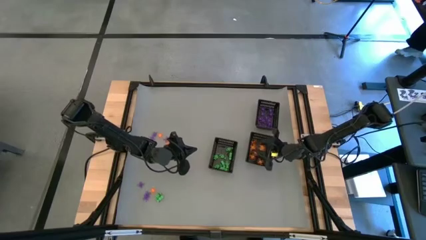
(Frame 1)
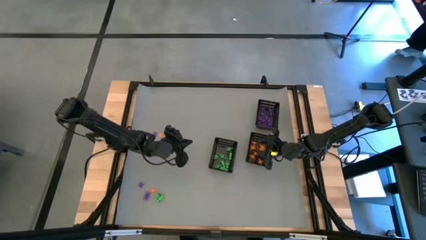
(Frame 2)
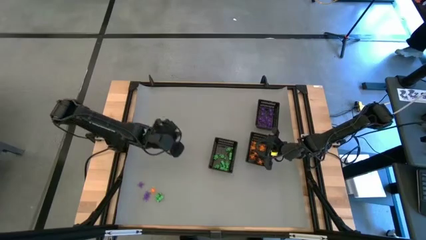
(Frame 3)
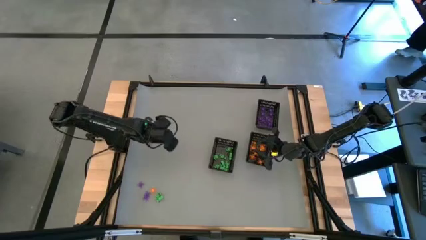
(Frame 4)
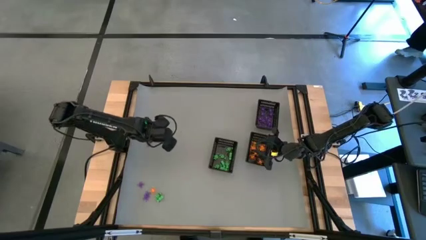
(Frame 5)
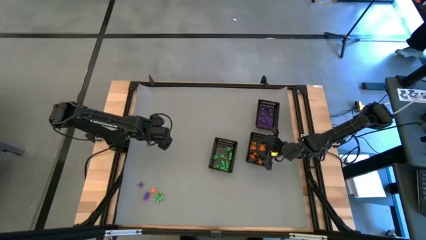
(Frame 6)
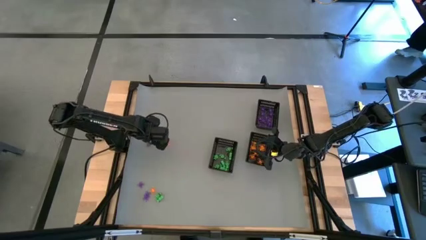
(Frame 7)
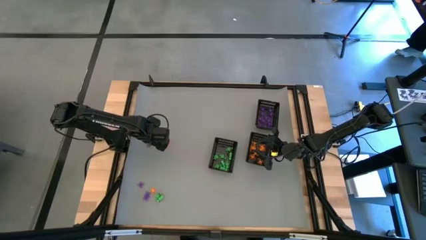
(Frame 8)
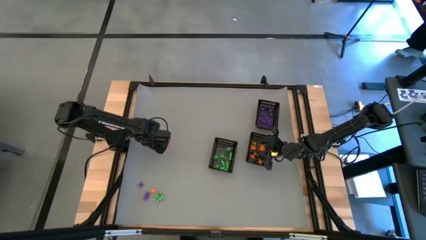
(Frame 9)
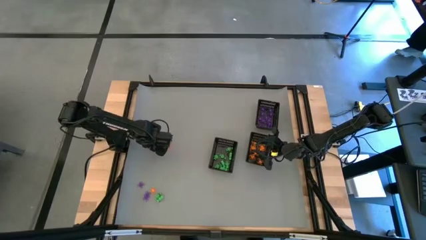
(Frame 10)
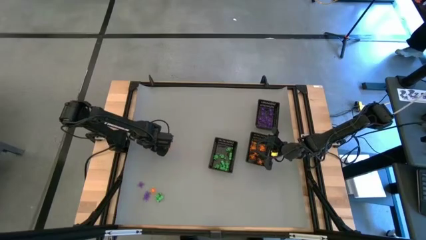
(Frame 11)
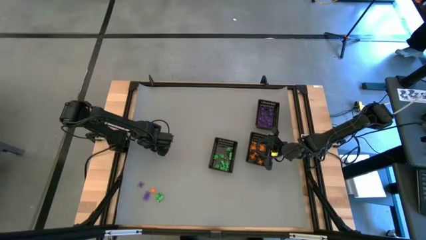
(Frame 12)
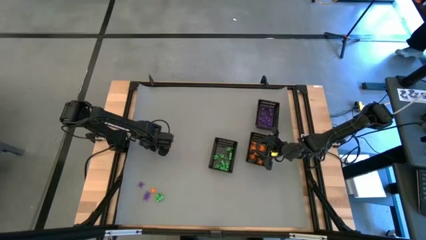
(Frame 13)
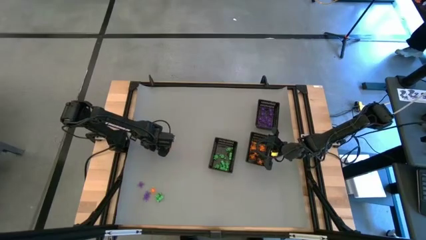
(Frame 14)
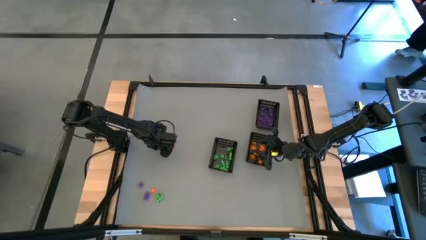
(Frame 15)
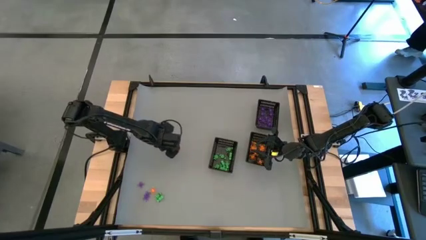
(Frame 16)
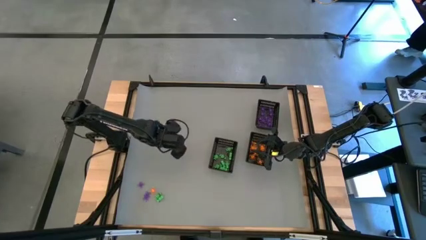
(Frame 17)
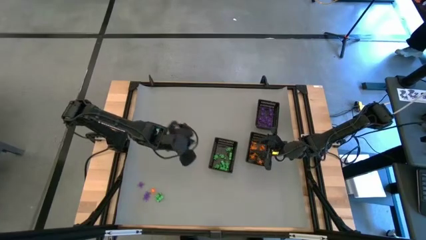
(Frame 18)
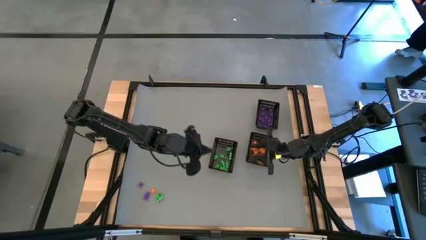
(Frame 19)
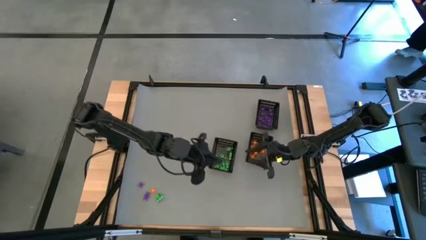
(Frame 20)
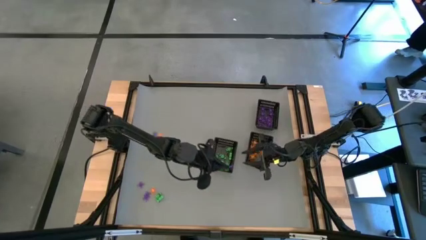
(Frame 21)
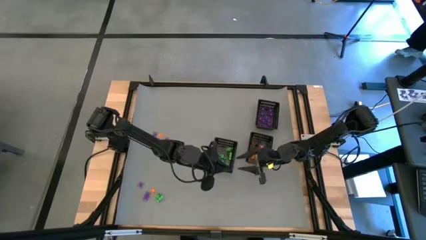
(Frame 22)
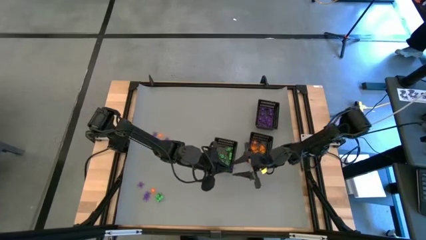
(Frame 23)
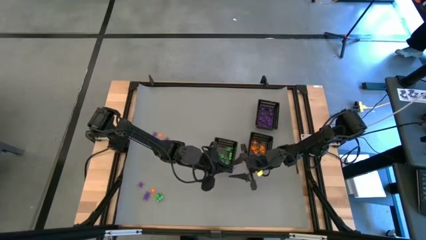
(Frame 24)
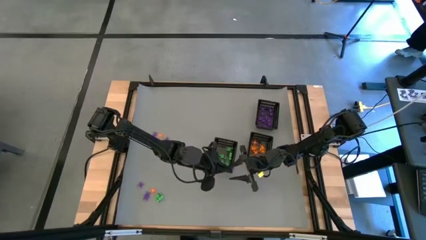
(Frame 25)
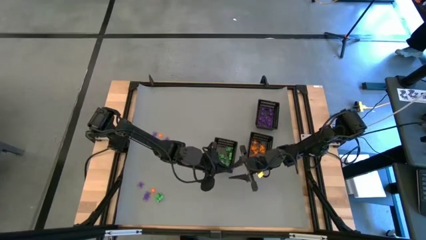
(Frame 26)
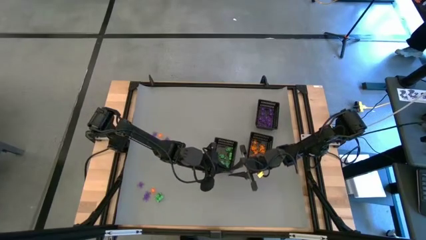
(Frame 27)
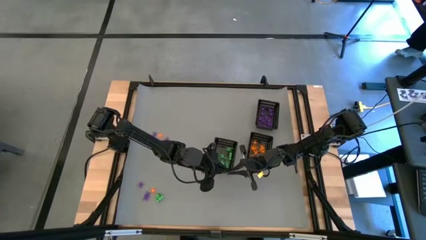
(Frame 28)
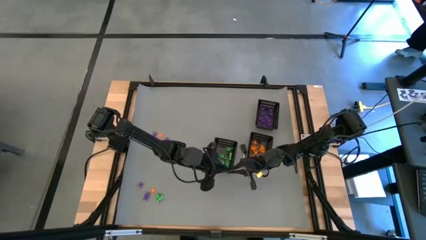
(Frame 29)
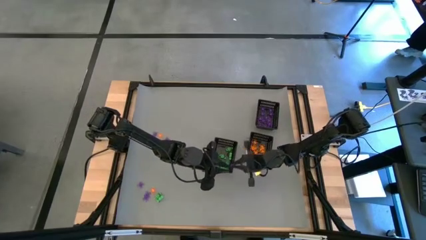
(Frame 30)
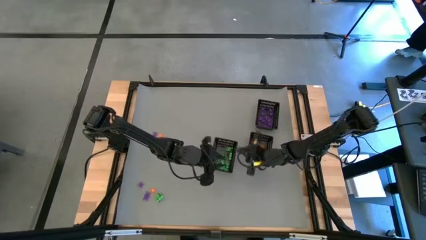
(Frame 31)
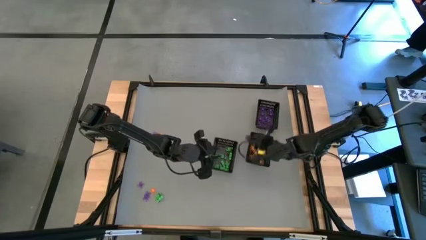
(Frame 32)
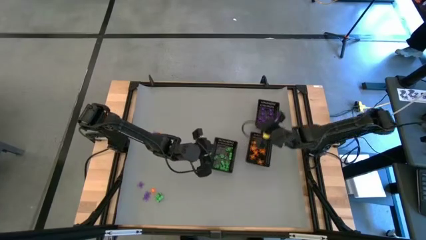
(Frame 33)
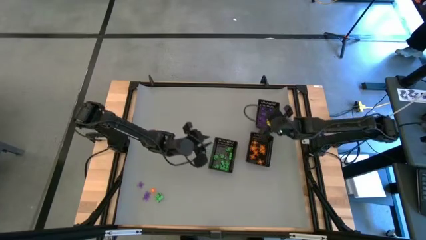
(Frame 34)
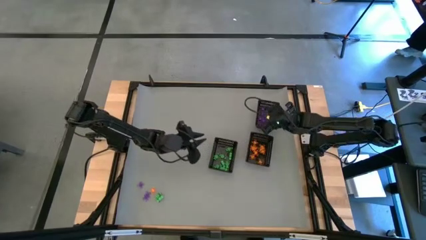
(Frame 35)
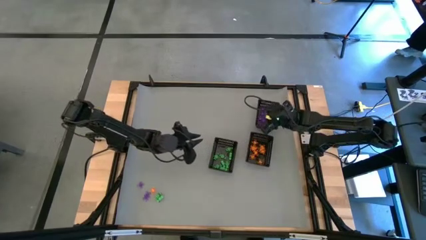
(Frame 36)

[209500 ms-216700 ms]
Task: Sort Halloween decoration
Put the purple spider toy into the top bin

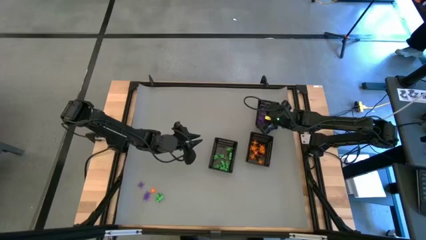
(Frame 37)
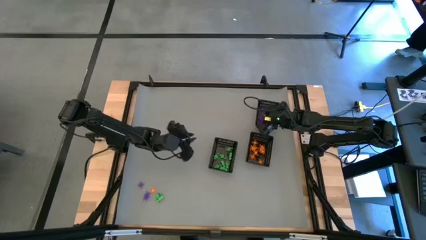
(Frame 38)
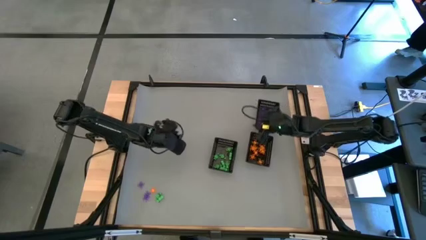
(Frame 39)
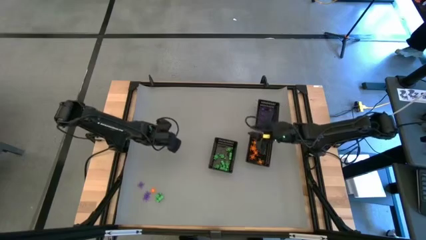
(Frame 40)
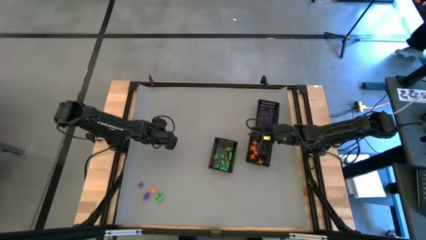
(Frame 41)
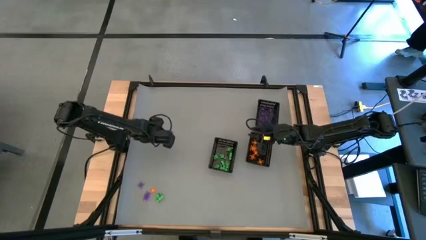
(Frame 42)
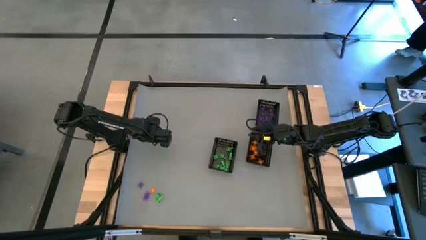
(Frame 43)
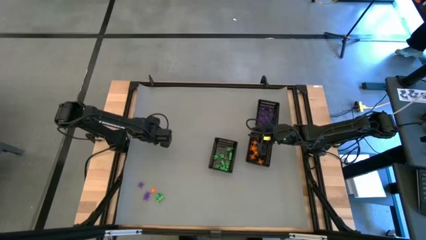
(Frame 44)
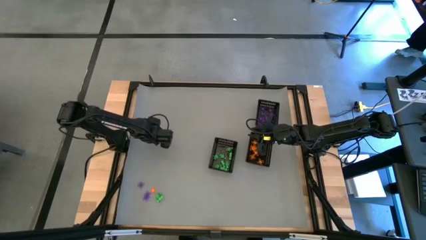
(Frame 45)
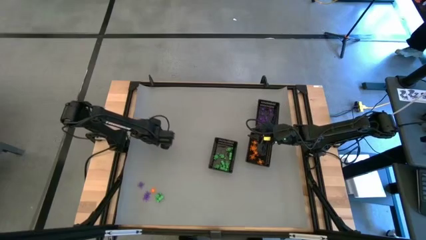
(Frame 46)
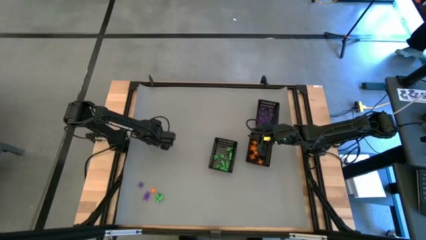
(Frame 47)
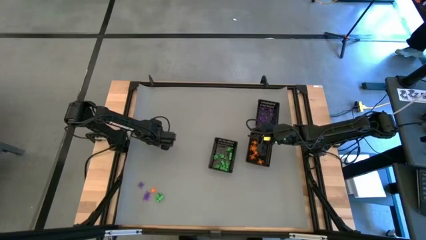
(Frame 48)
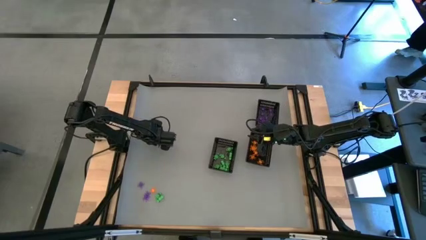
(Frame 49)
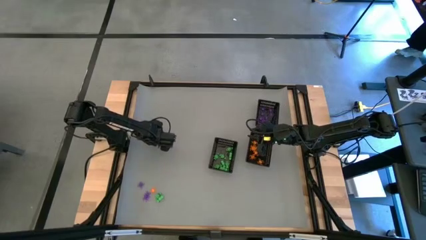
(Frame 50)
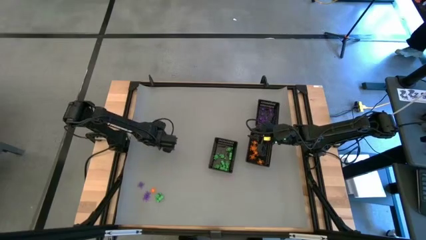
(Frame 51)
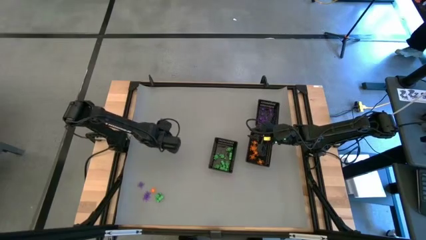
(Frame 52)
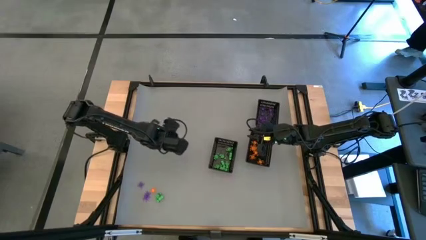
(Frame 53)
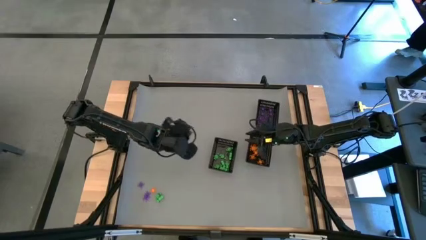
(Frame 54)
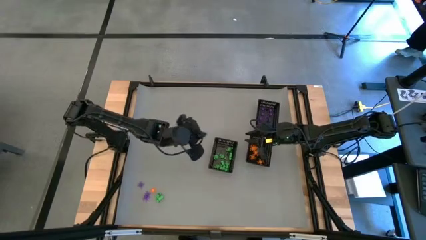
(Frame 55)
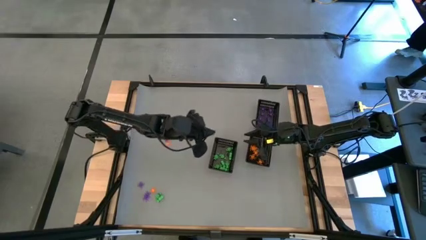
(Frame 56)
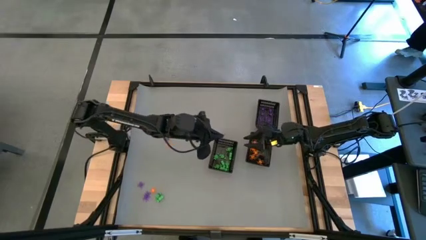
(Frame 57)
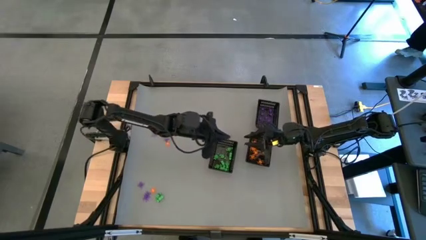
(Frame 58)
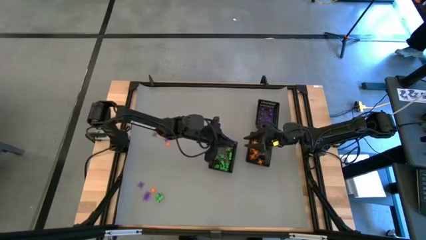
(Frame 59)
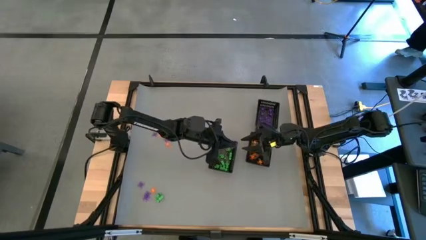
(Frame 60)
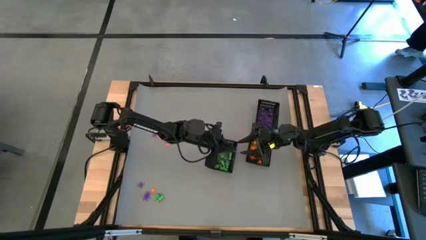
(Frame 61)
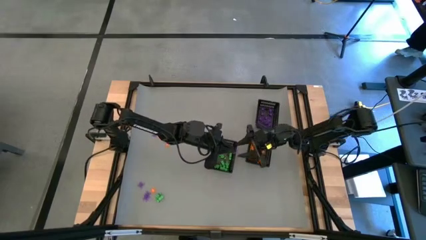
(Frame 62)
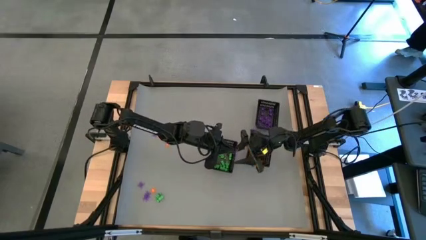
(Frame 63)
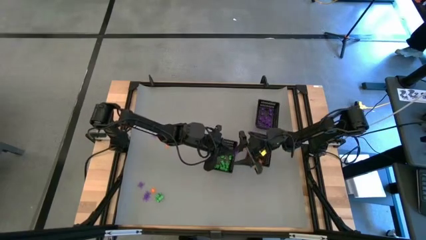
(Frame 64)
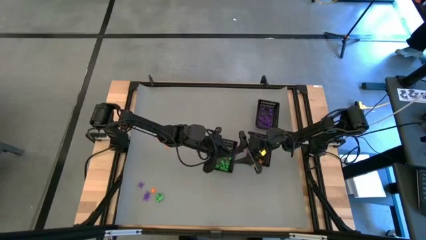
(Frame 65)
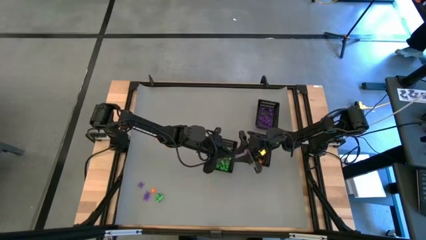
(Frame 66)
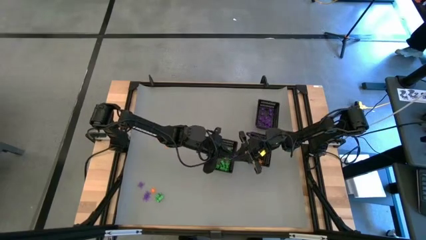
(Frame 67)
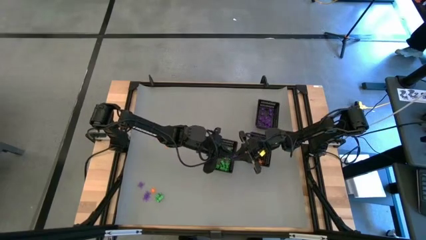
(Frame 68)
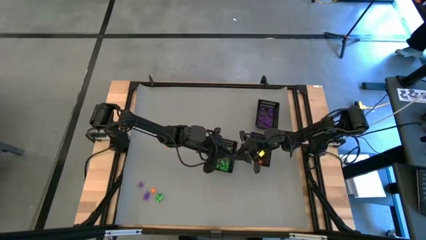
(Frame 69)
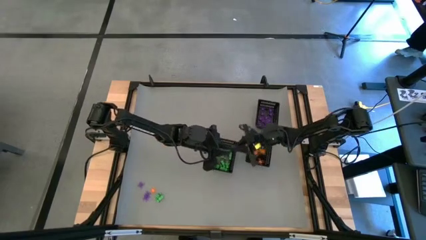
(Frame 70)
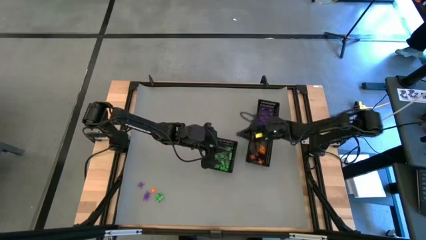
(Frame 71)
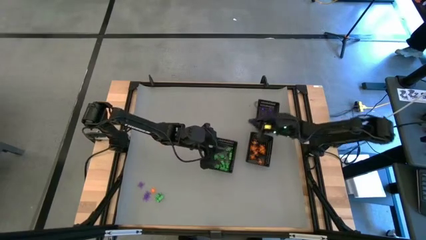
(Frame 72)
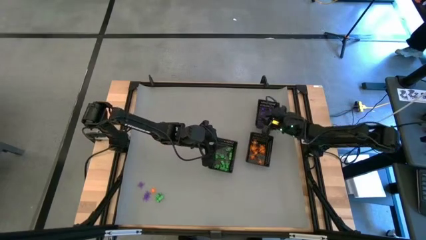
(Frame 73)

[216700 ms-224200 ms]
Put the purple spider toy into the top bin

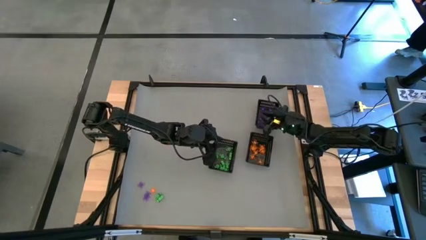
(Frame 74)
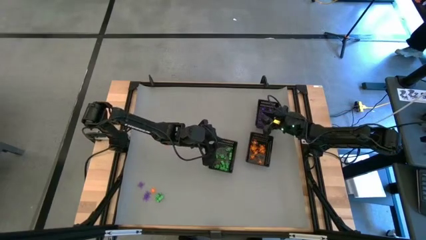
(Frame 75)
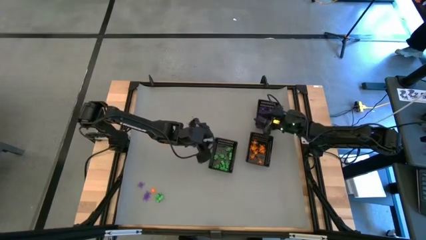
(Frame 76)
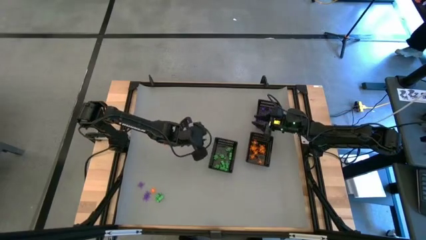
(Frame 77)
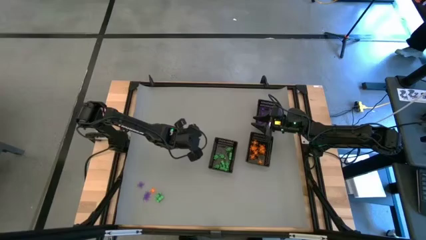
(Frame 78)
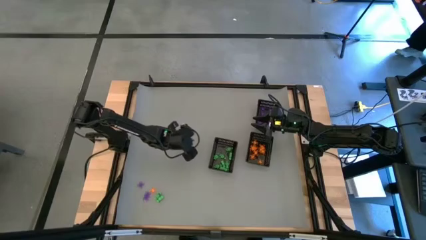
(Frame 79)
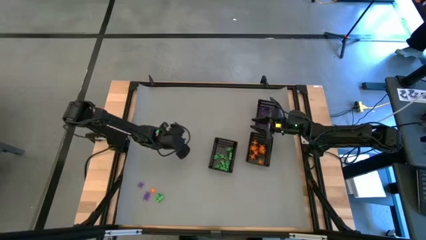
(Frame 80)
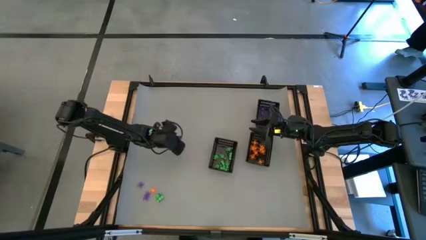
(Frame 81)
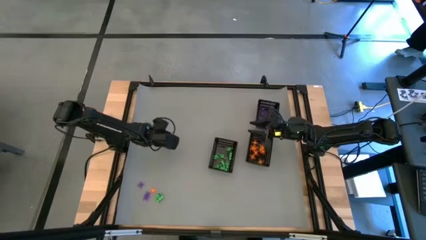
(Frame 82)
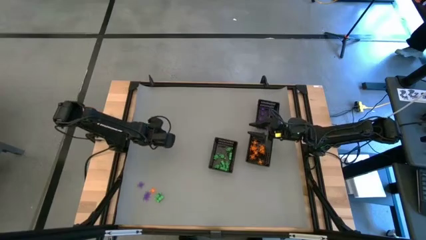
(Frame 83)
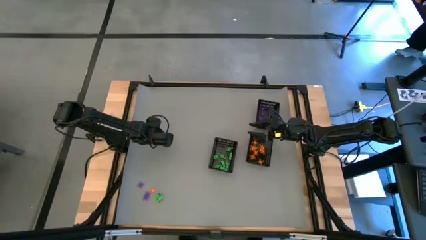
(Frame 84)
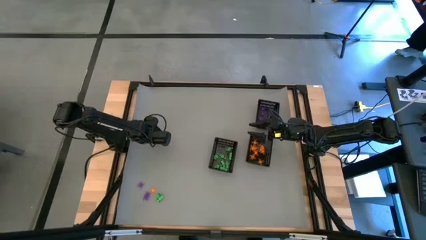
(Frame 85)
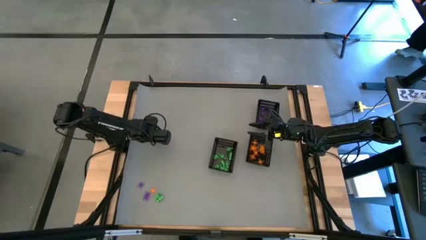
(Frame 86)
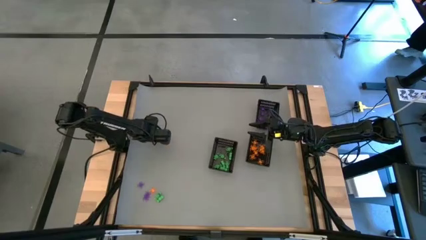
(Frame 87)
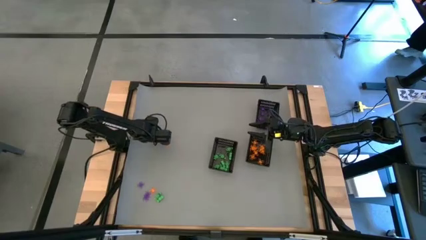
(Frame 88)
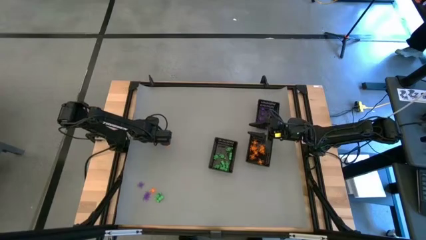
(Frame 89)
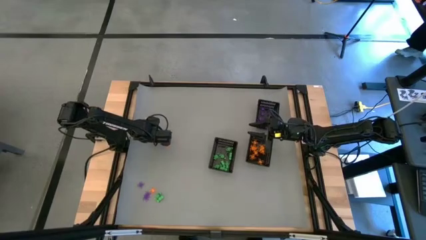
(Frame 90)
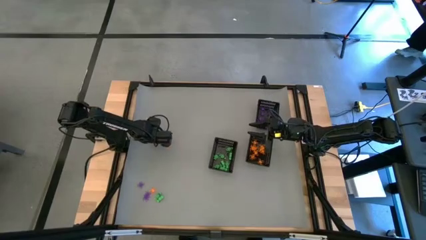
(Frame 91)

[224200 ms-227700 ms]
Put the purple spider toy into the top bin
